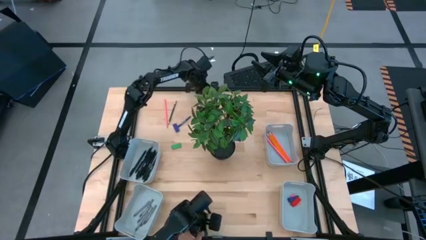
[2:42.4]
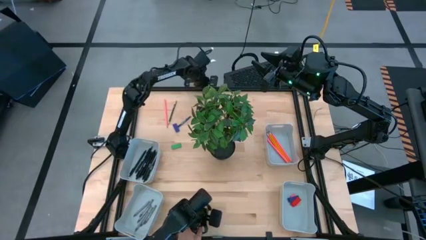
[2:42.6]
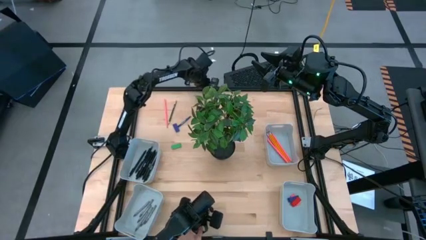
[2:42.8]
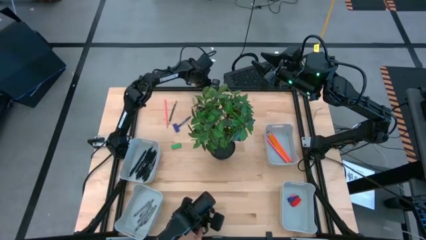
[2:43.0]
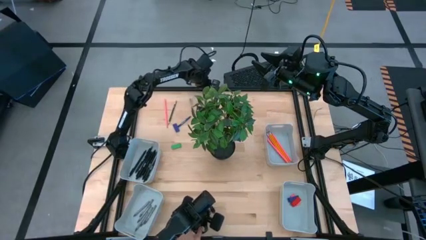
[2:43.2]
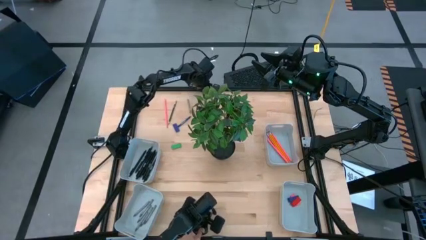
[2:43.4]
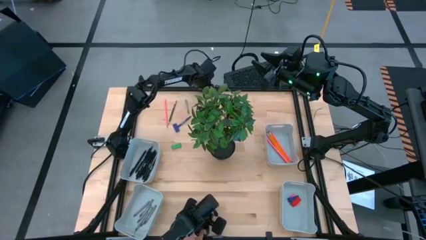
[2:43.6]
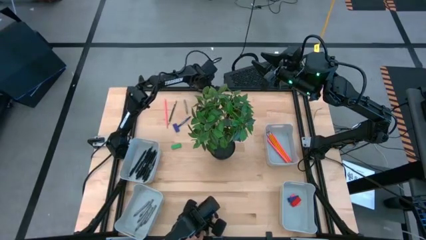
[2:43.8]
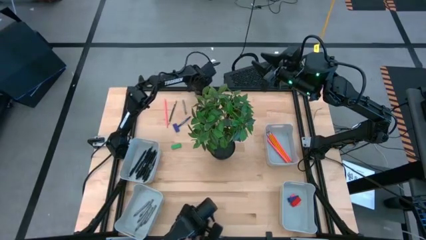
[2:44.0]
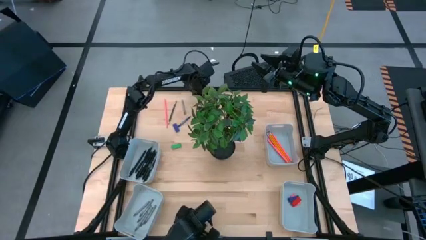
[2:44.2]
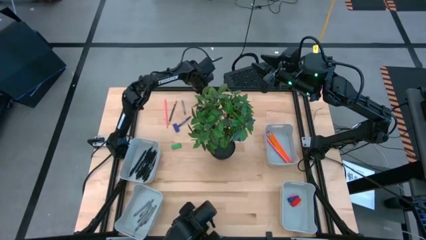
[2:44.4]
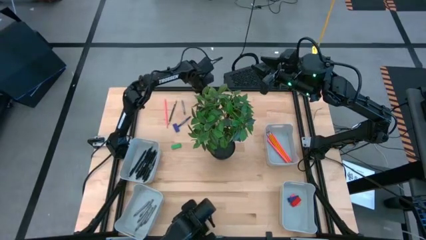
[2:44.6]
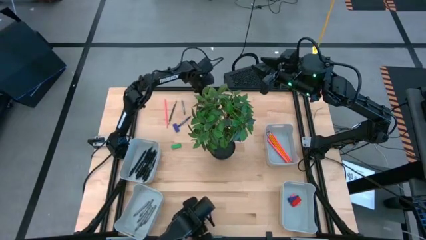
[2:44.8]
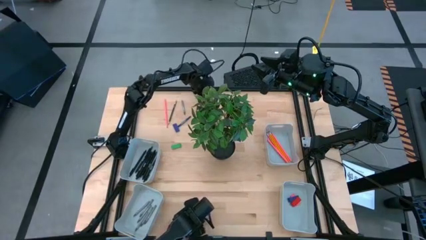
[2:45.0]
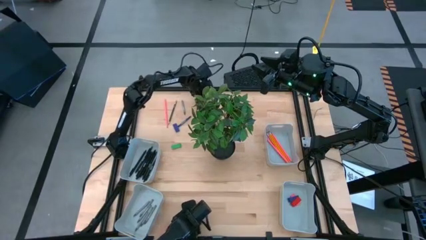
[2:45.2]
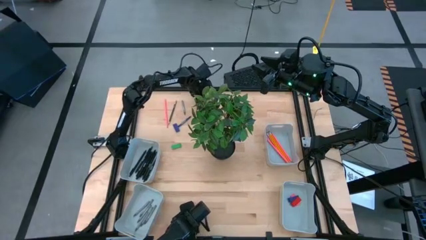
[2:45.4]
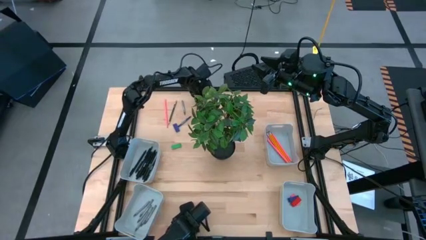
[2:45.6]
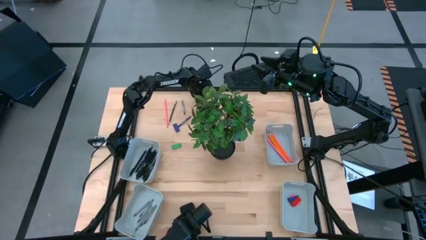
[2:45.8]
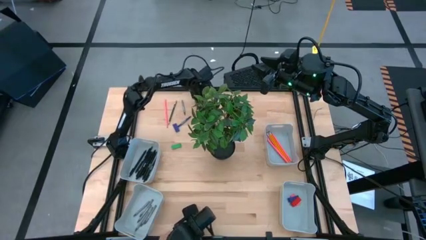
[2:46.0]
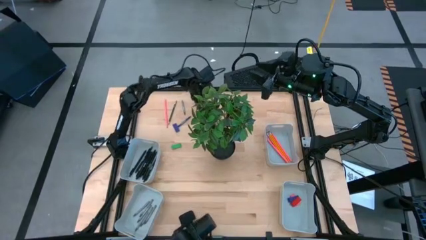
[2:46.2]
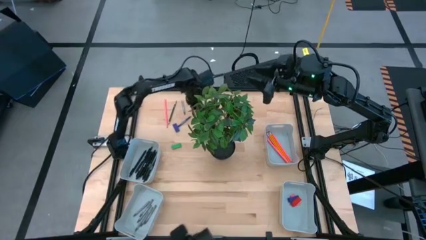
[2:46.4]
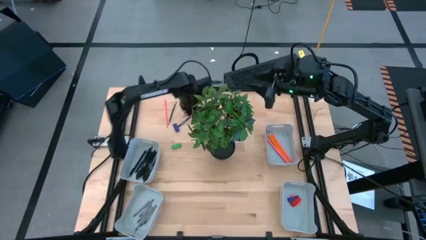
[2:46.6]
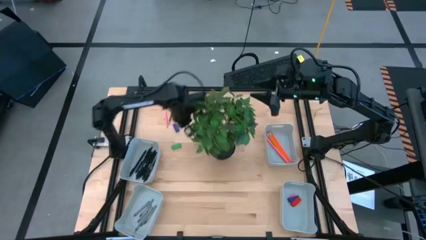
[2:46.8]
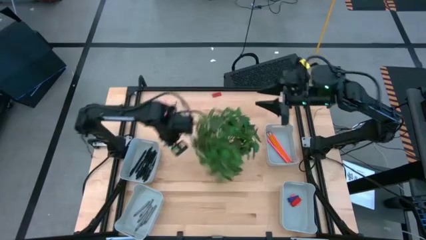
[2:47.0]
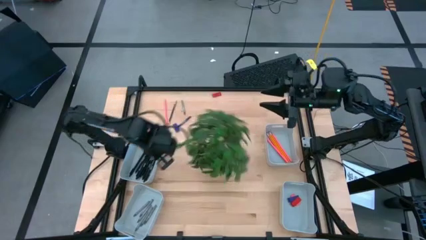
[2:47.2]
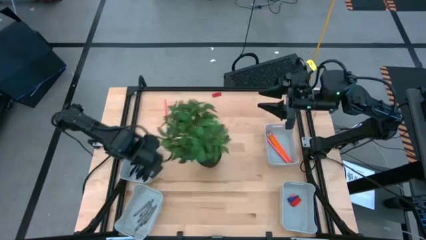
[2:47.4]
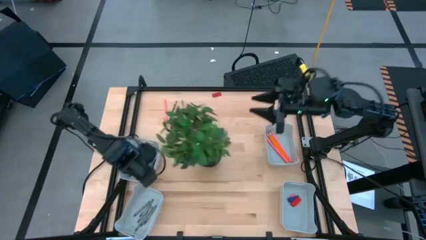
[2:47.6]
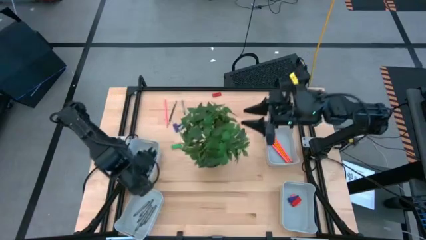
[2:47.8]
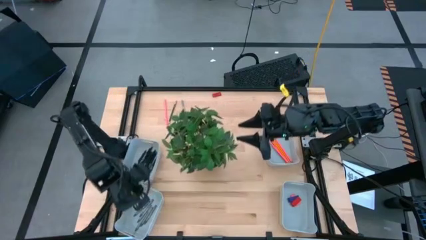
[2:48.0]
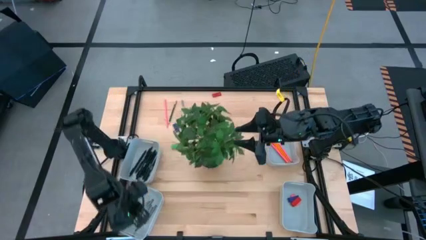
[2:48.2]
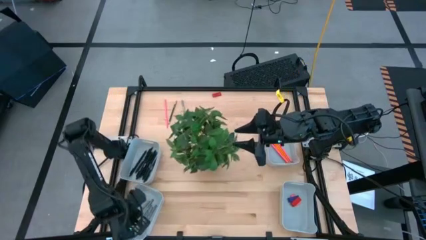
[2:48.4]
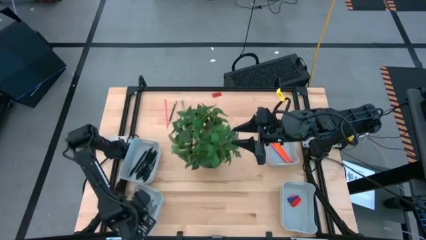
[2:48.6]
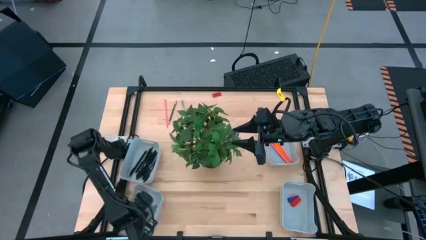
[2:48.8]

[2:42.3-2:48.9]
Task: Sort crayons/erasers/pens/pencils in bins
Put the gray crayon into the bottom left gray bin

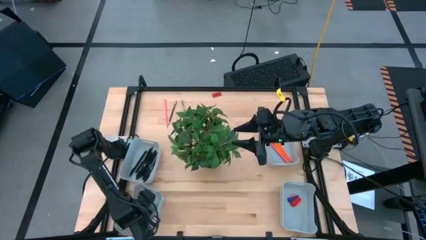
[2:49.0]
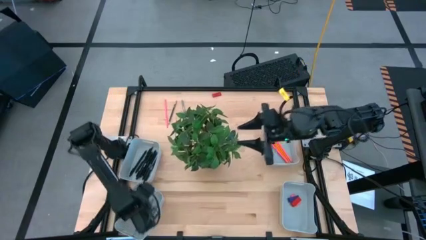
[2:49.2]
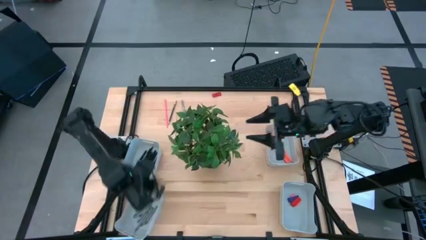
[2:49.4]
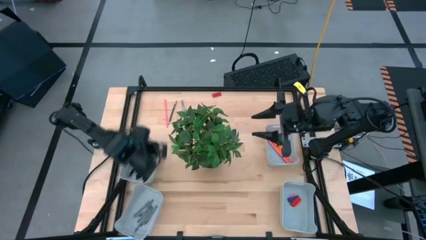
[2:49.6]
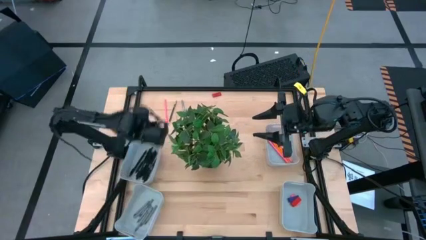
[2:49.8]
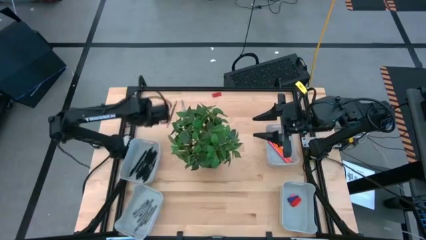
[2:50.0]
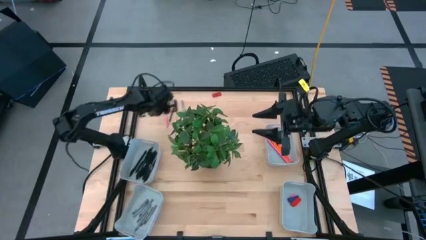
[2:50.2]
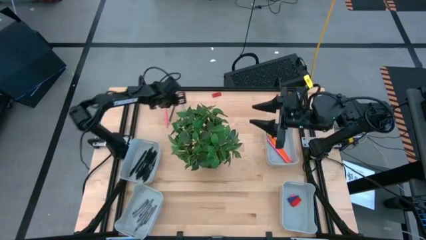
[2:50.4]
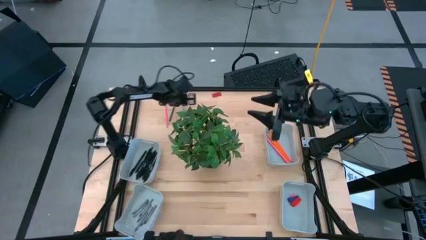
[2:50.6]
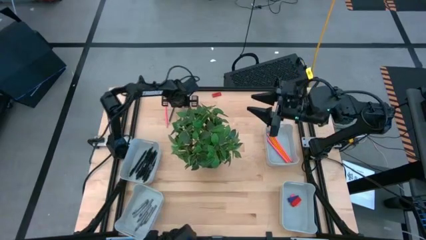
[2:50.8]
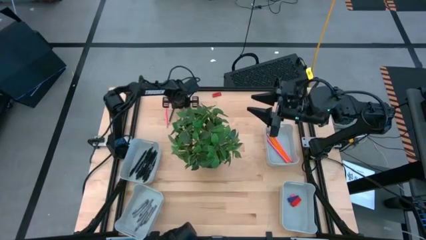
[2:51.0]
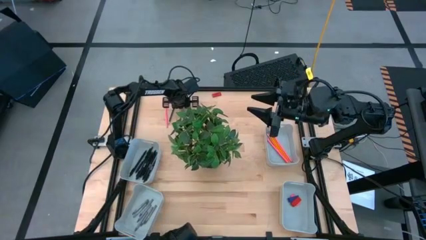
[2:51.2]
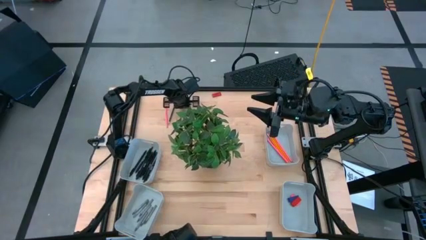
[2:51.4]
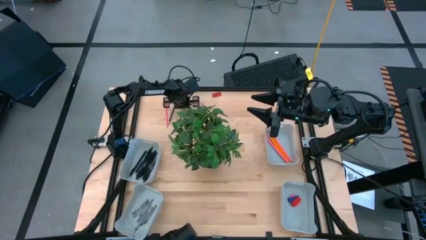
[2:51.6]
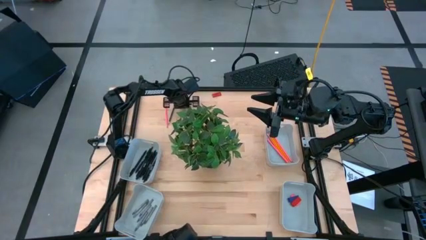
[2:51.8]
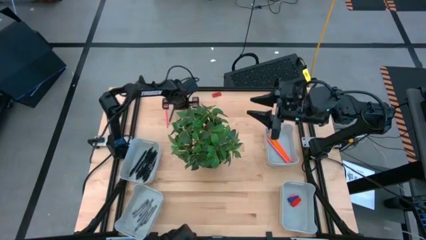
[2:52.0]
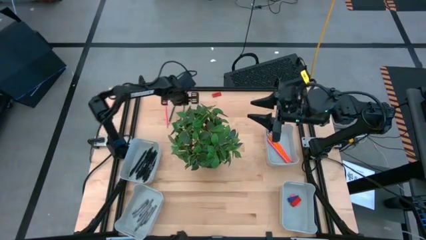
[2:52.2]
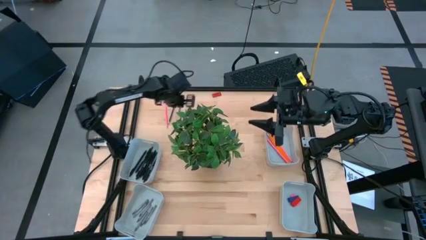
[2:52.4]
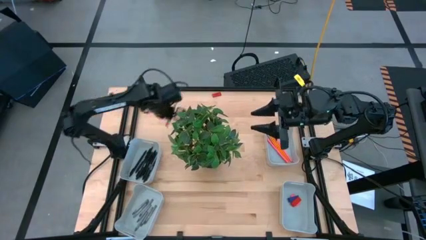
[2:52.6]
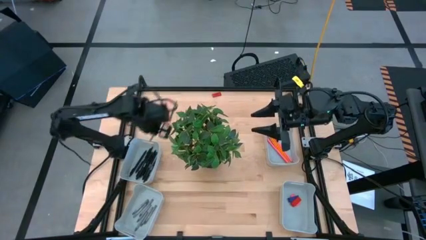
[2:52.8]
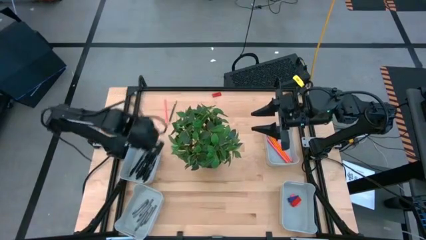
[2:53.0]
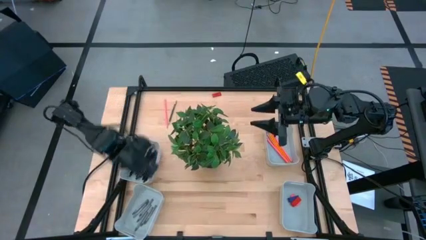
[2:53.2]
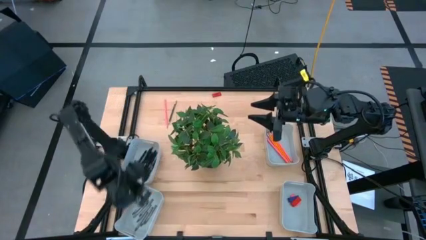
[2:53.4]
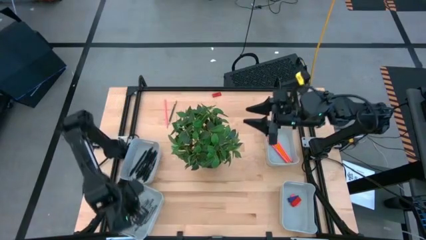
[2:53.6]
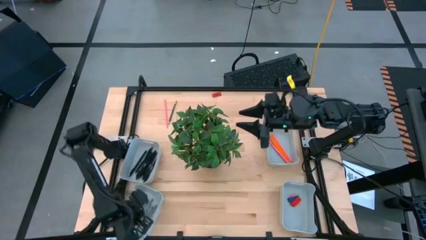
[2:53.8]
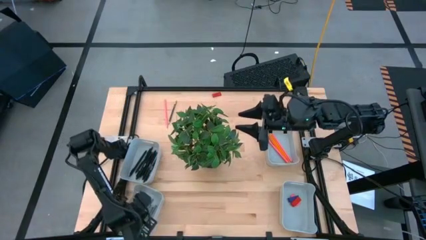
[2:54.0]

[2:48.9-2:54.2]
Put the gray crayon into the bottom left gray bin

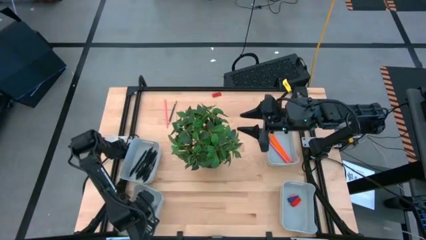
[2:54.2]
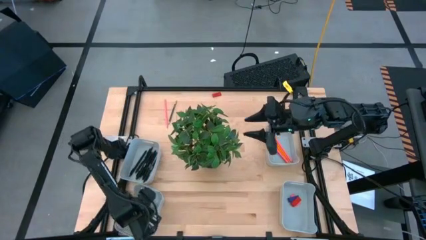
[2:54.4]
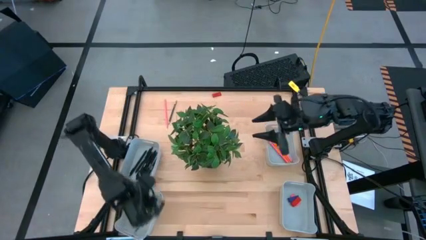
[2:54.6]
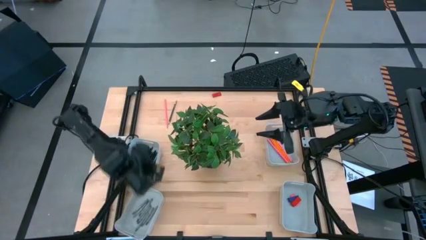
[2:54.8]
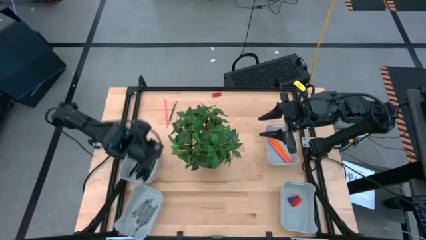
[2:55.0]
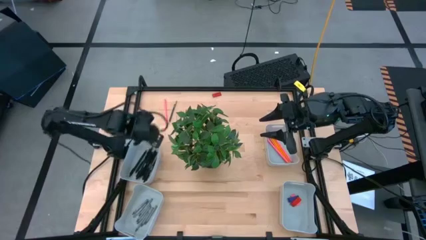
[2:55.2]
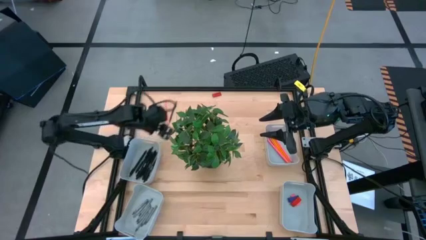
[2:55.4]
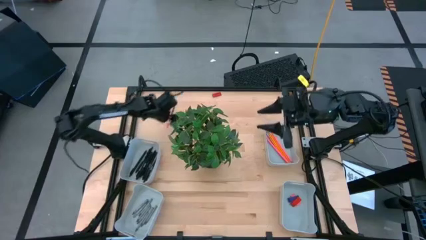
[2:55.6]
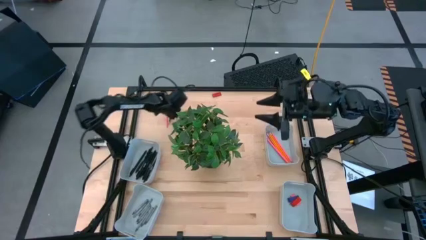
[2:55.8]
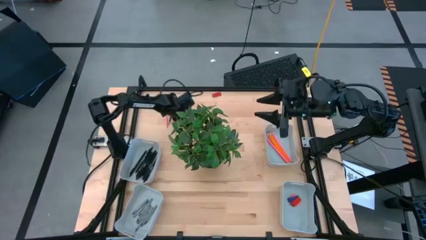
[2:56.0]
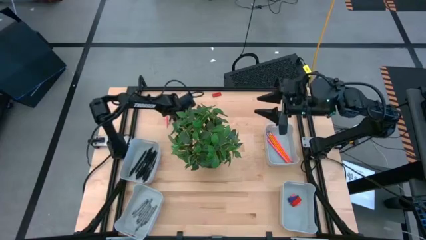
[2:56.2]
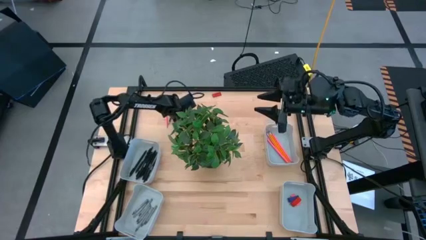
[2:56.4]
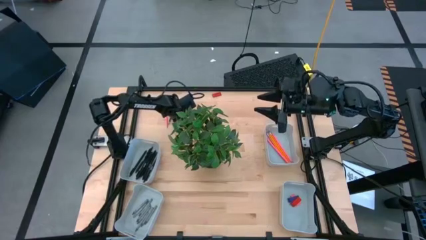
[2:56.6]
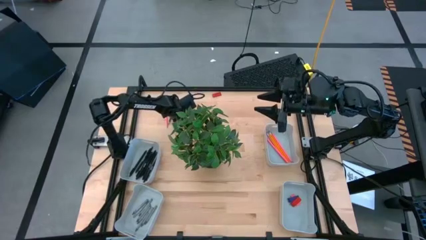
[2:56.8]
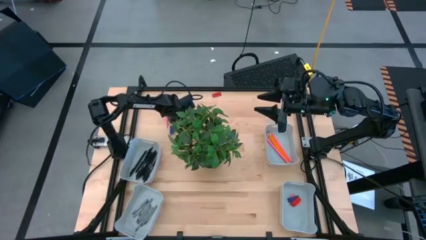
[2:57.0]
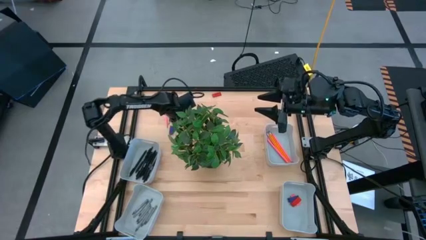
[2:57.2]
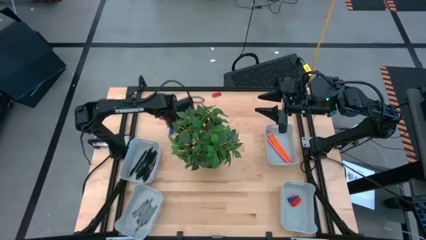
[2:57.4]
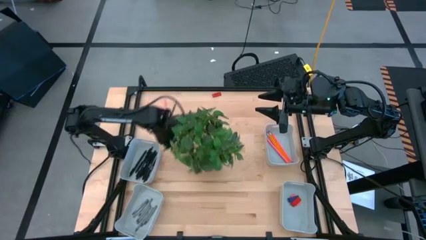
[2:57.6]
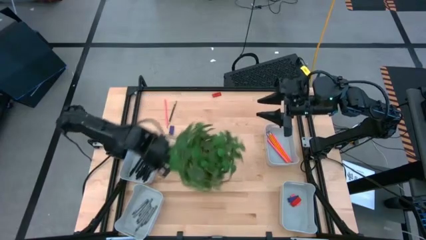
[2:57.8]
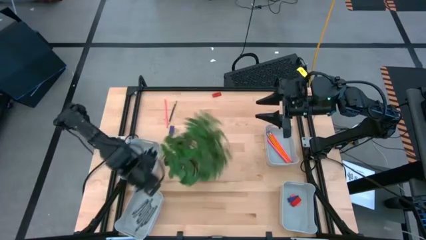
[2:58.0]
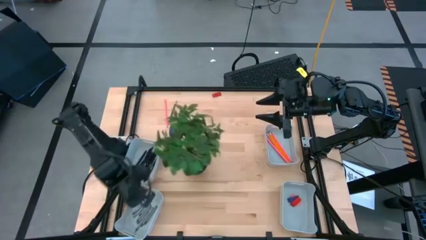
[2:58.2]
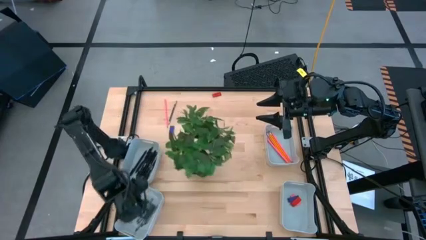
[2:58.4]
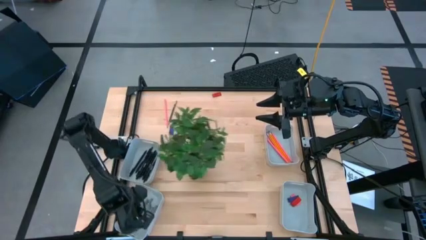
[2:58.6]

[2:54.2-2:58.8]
Put the blue crayon into the bottom left gray bin
